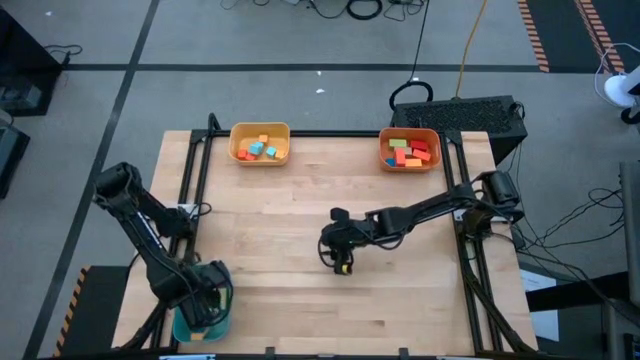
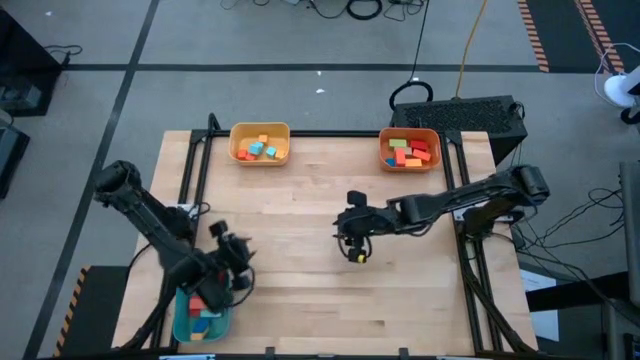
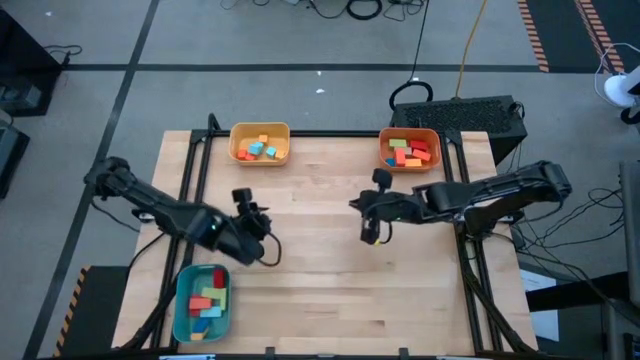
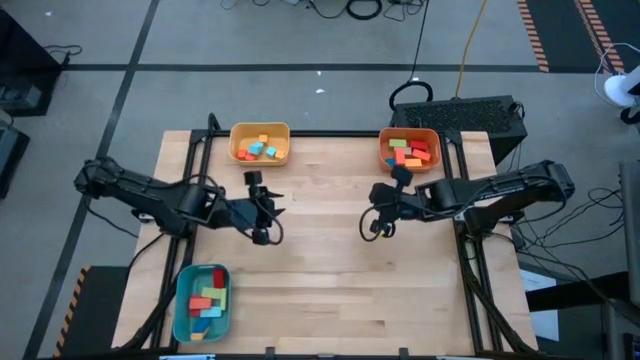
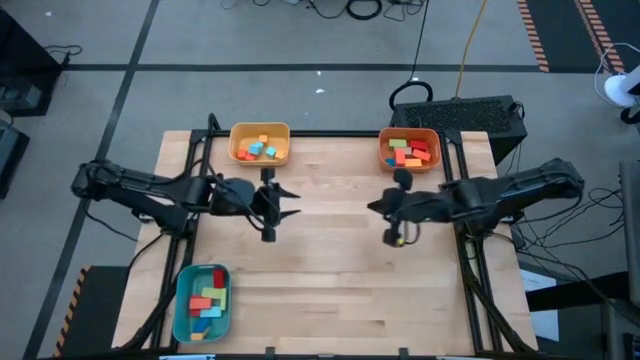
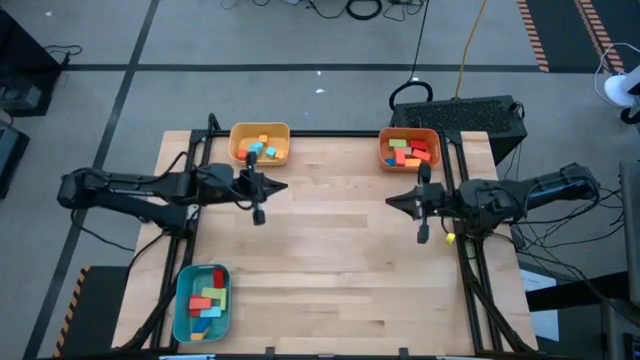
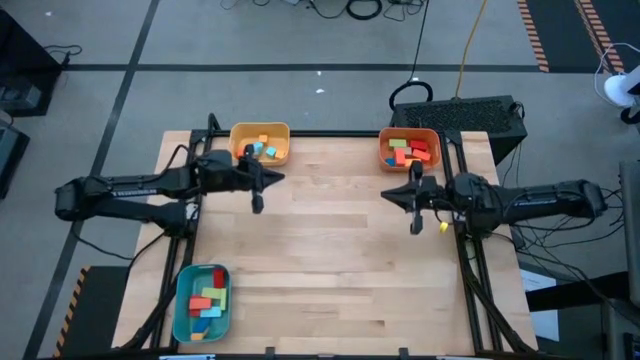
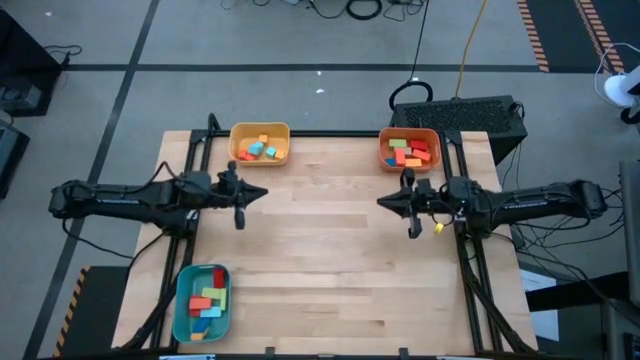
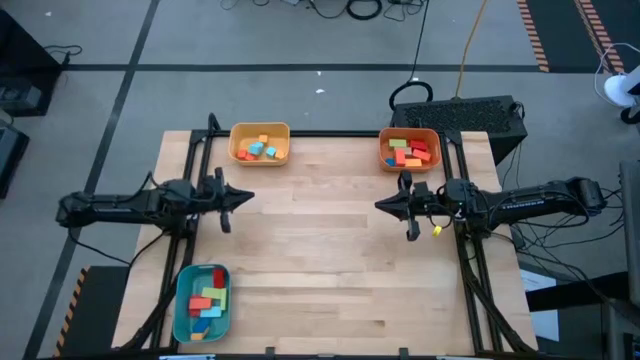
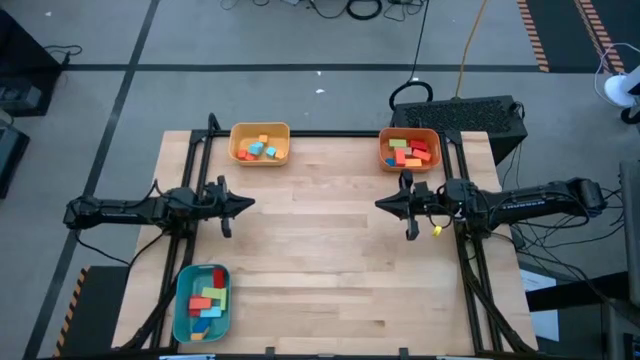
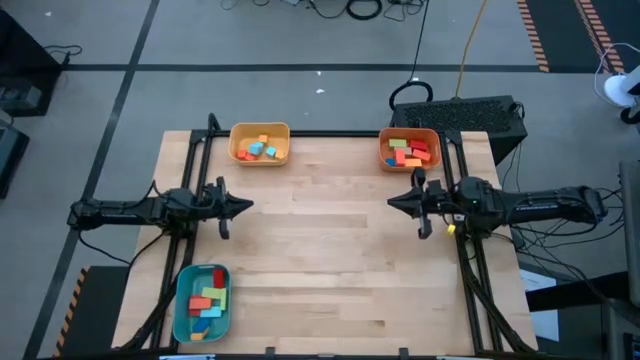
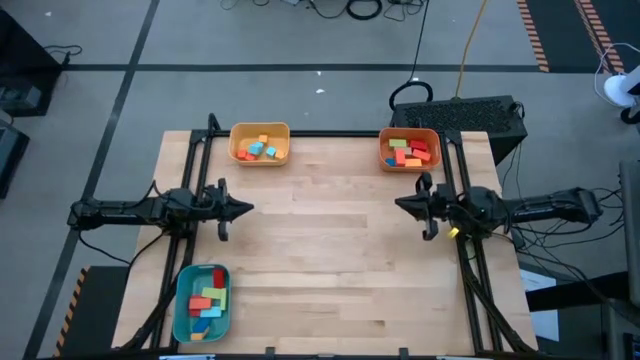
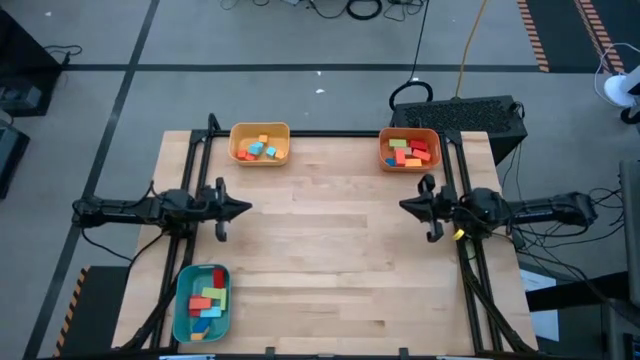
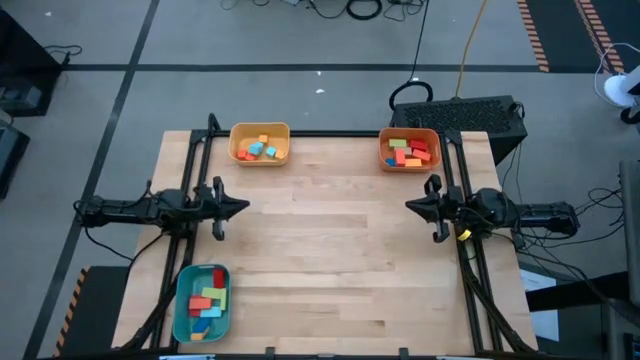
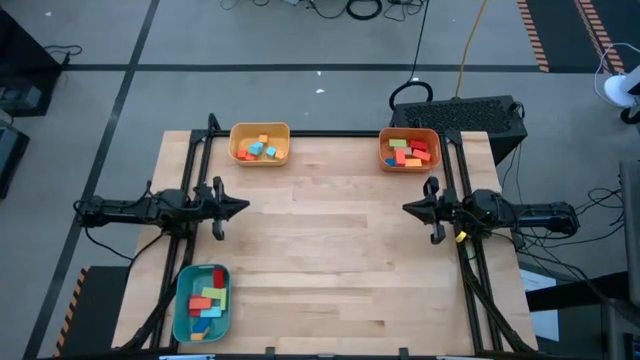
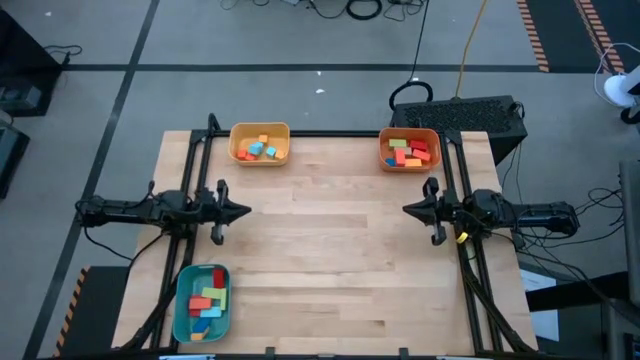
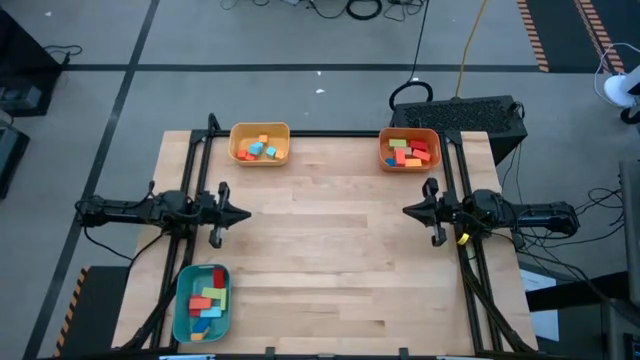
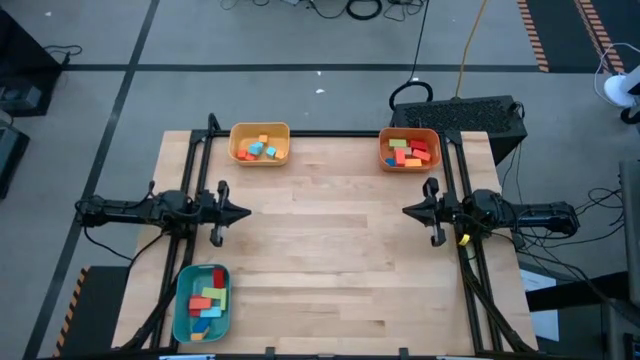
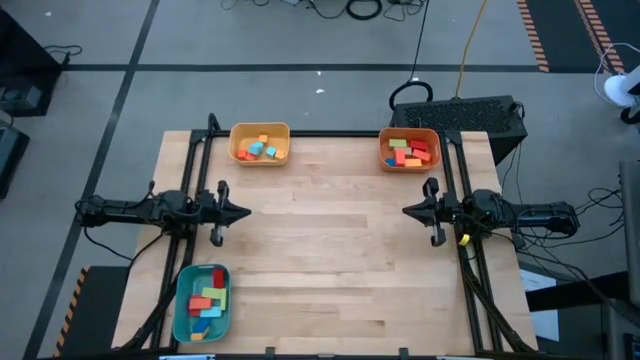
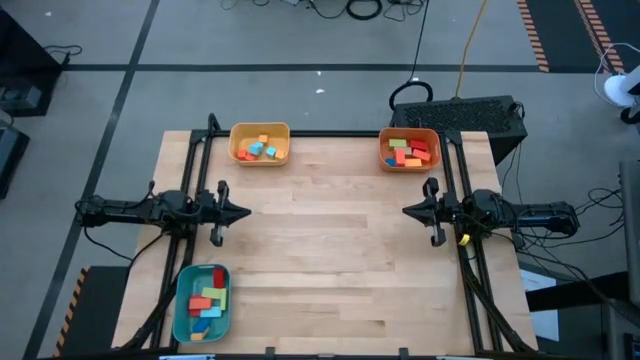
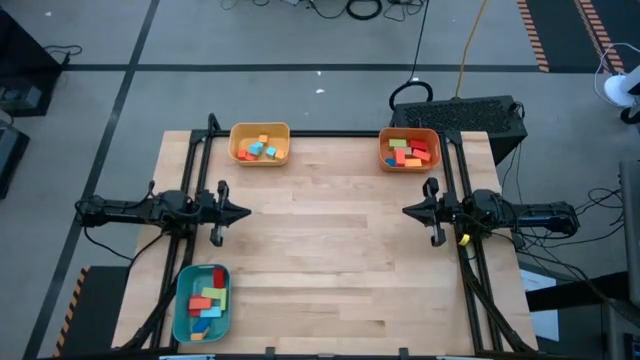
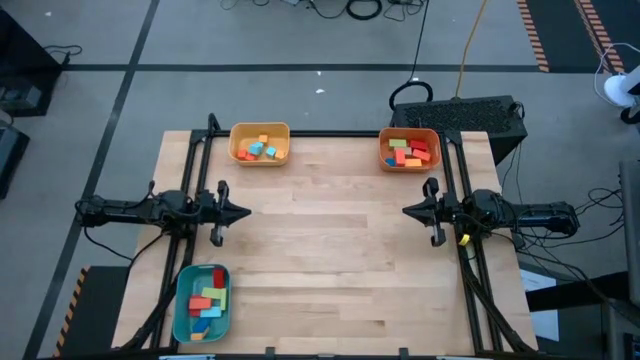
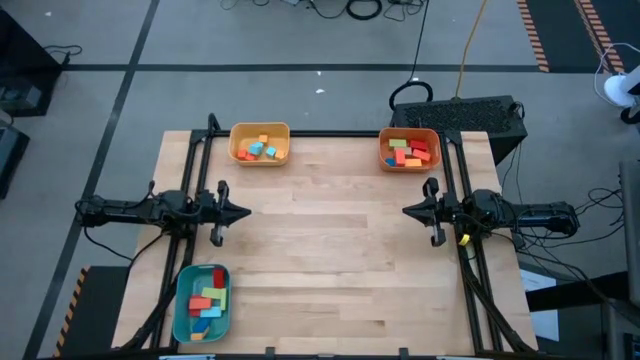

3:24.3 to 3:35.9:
Task: Sort blocks by size
Return to Home Position

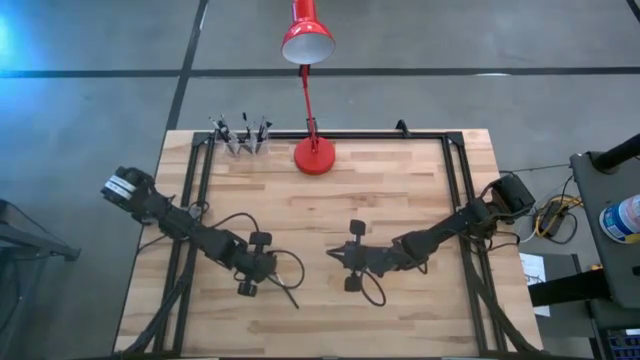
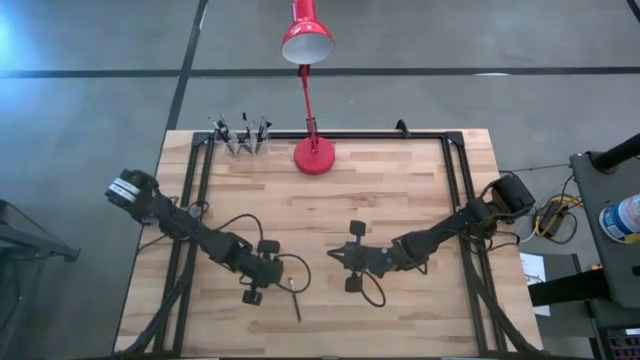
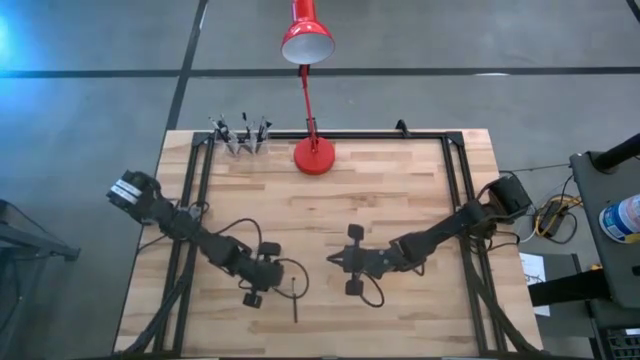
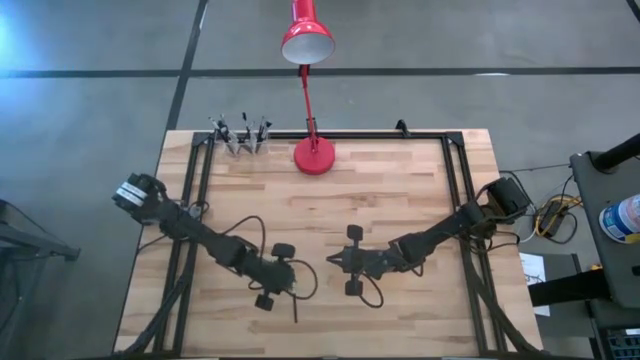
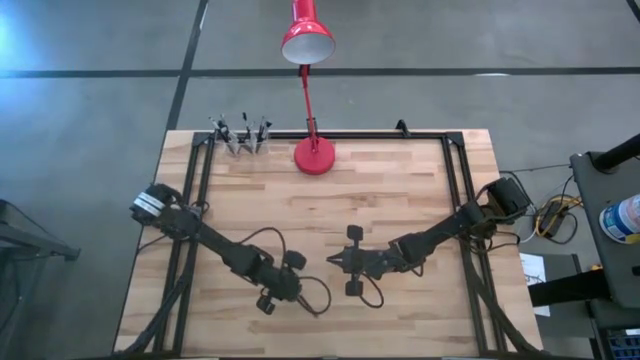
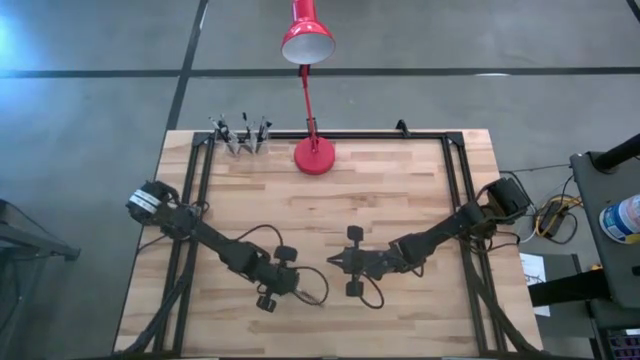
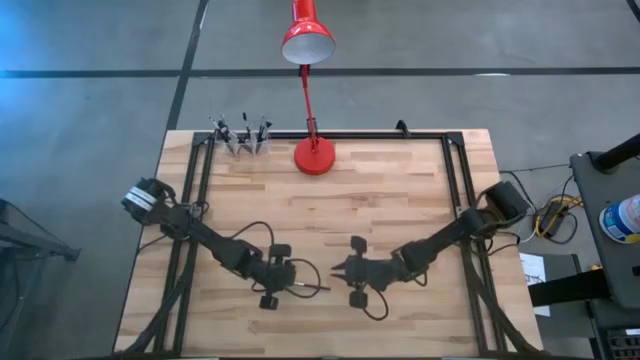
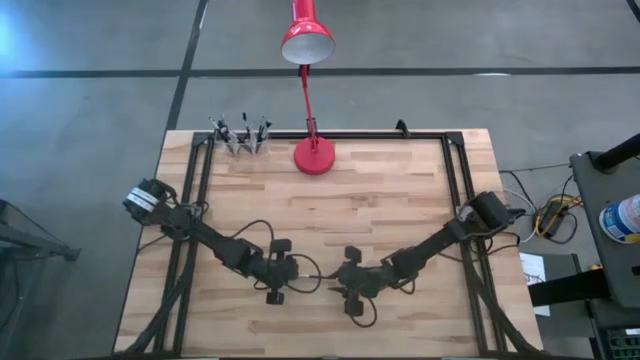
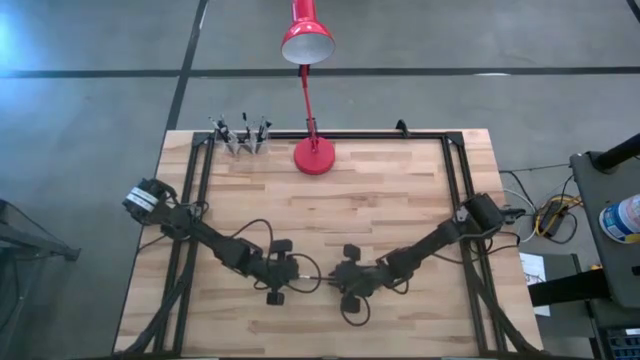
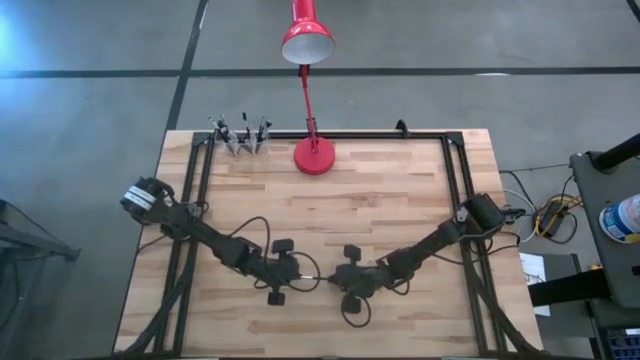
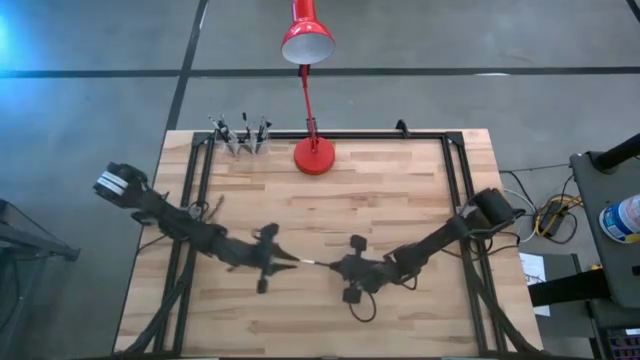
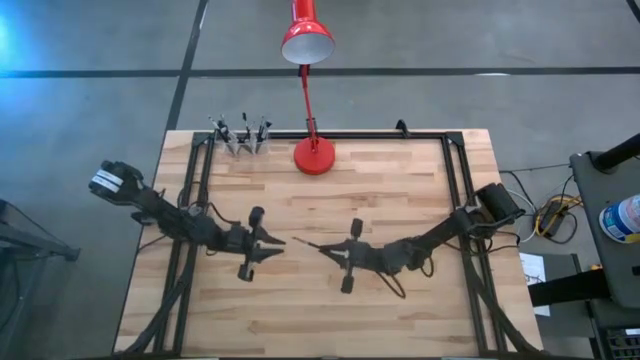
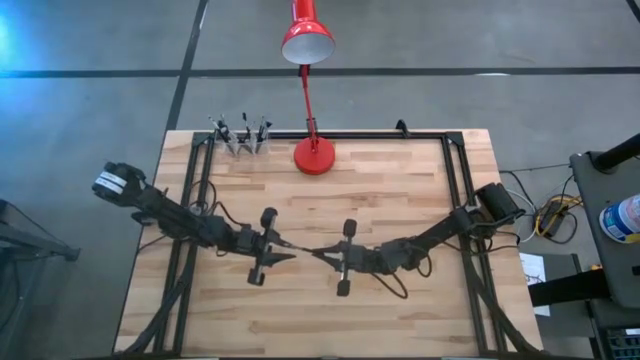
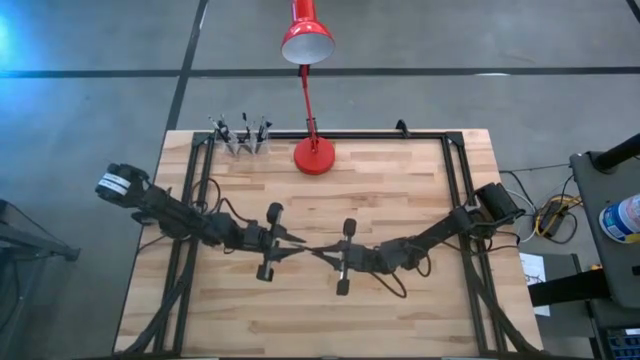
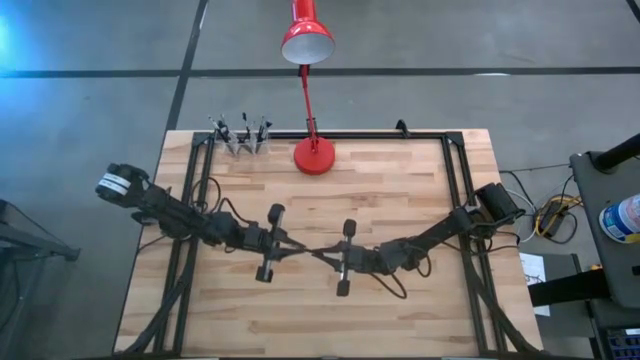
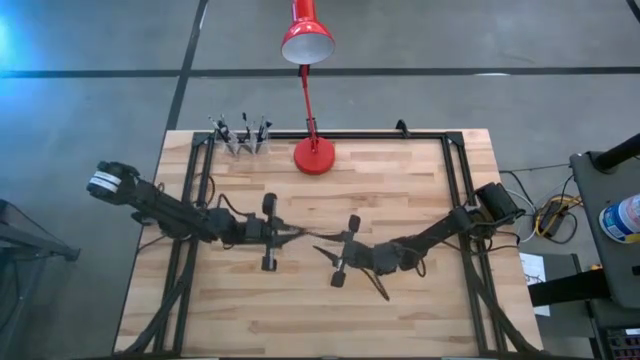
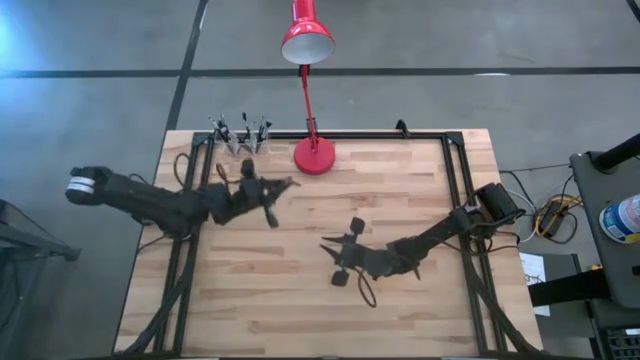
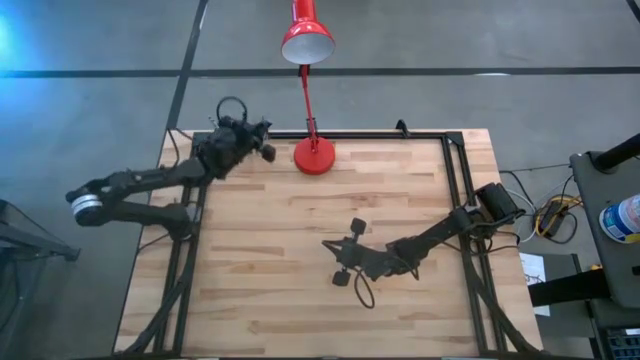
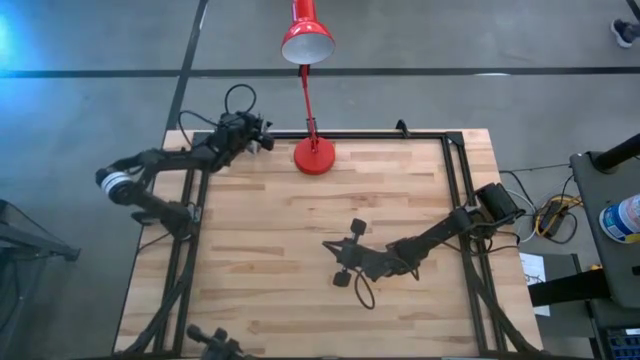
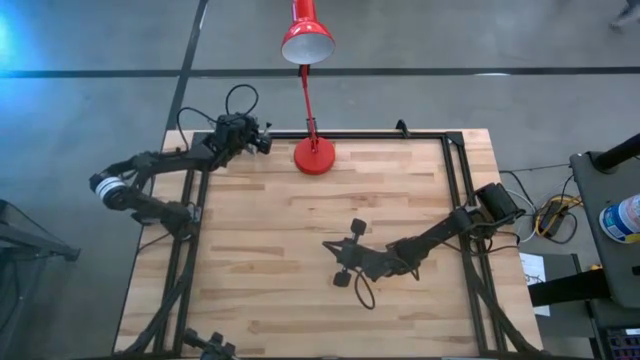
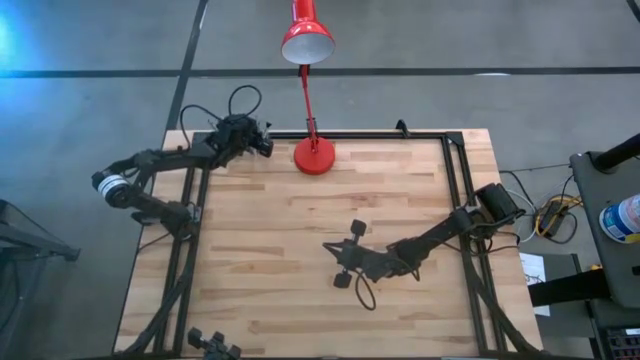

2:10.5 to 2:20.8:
Task: Pick & Place Makeup Supplies
Put the makeup brush into the transparent organizer
